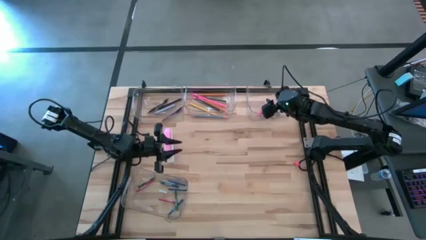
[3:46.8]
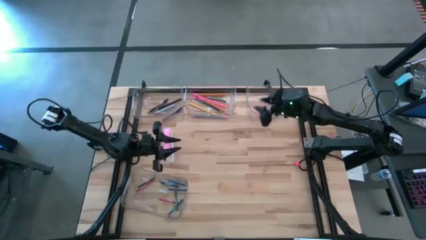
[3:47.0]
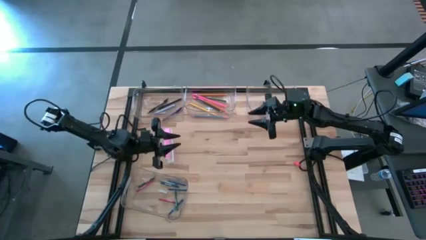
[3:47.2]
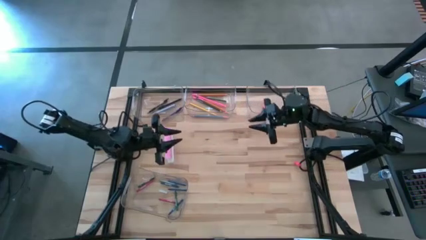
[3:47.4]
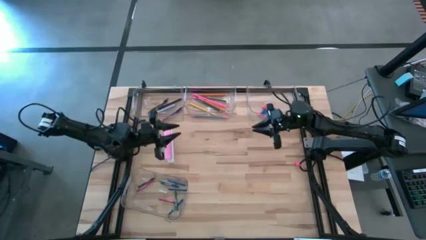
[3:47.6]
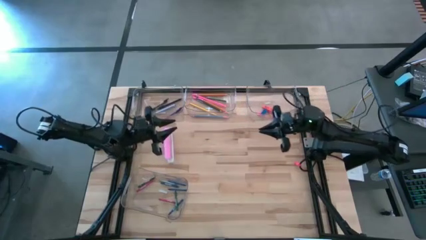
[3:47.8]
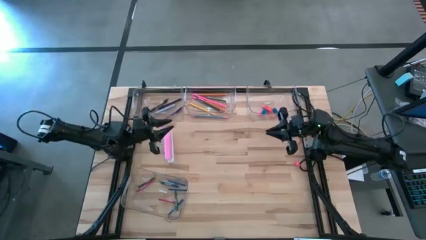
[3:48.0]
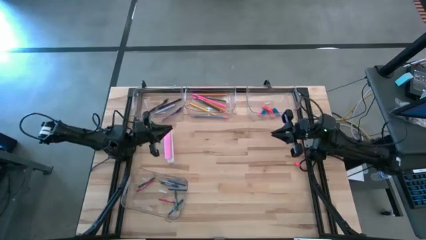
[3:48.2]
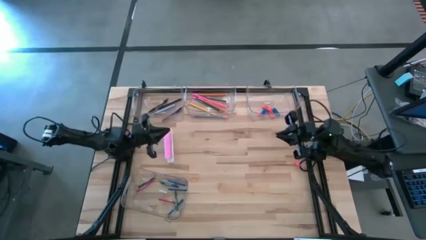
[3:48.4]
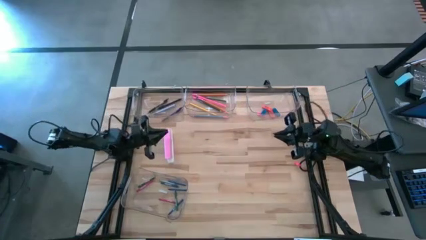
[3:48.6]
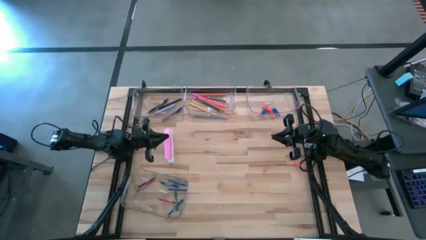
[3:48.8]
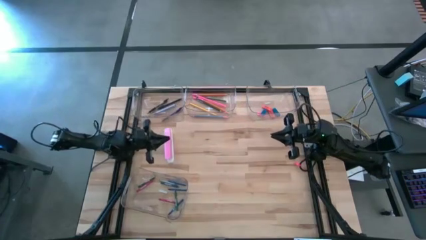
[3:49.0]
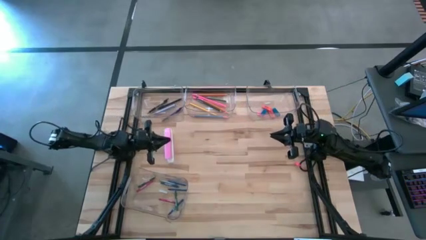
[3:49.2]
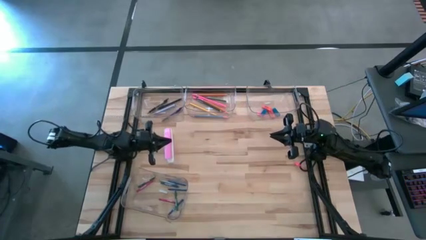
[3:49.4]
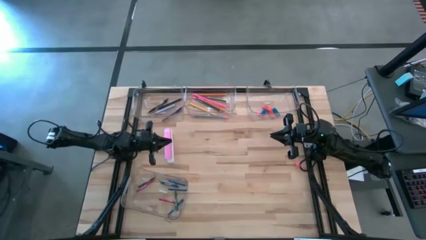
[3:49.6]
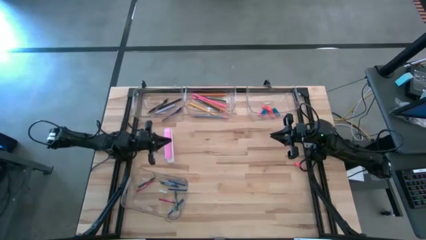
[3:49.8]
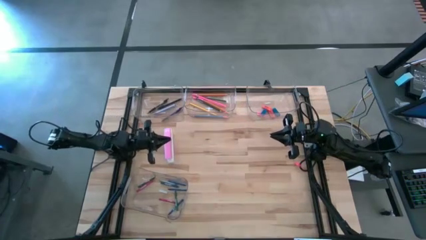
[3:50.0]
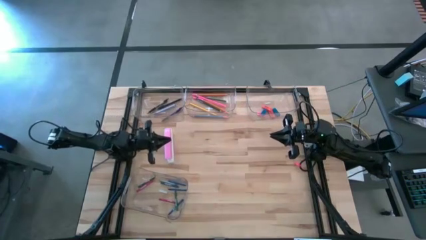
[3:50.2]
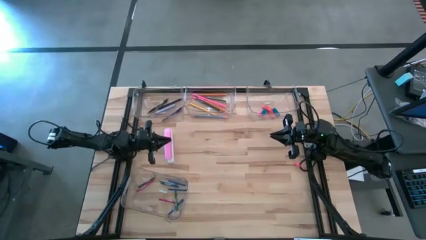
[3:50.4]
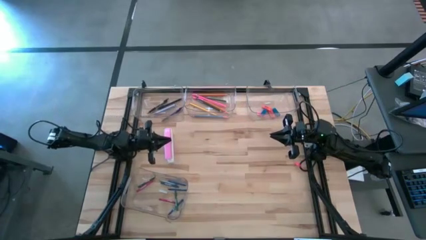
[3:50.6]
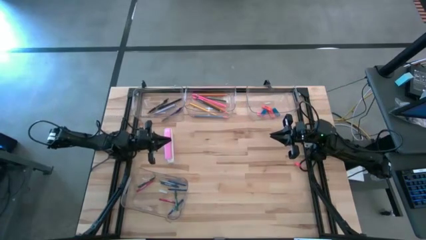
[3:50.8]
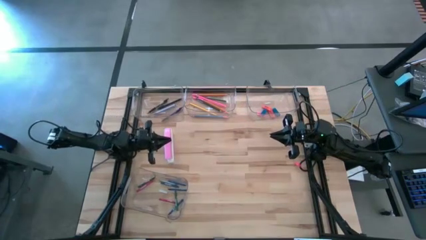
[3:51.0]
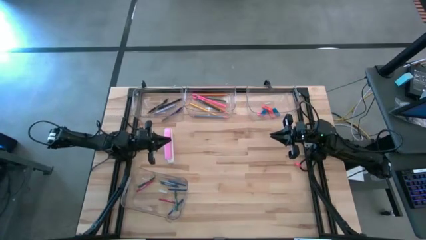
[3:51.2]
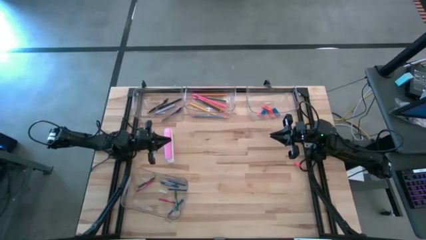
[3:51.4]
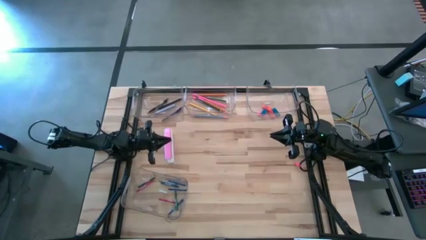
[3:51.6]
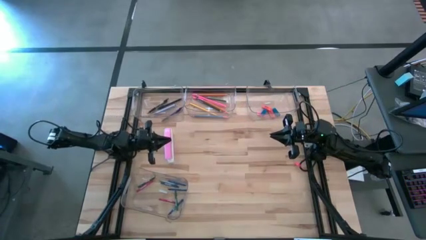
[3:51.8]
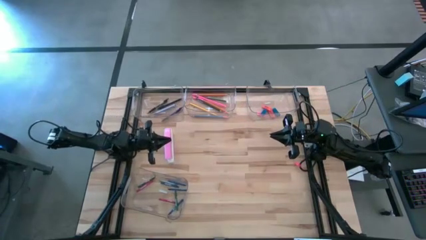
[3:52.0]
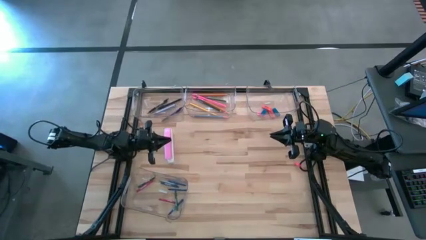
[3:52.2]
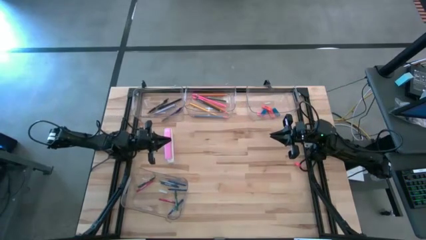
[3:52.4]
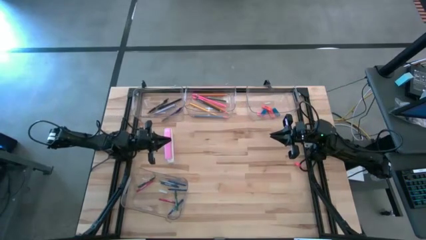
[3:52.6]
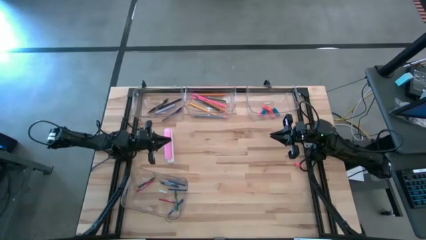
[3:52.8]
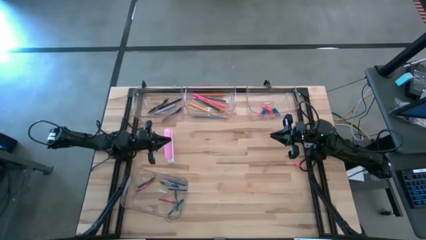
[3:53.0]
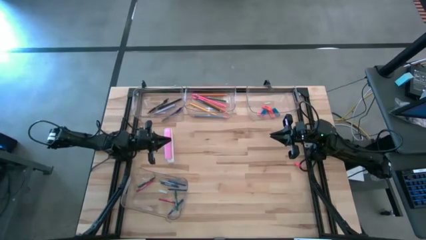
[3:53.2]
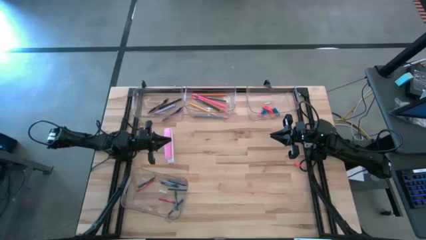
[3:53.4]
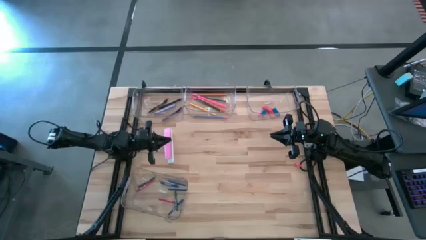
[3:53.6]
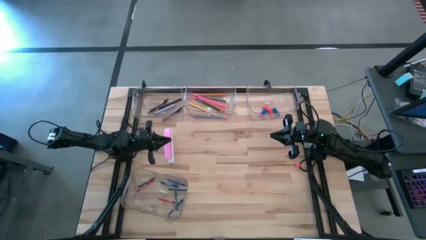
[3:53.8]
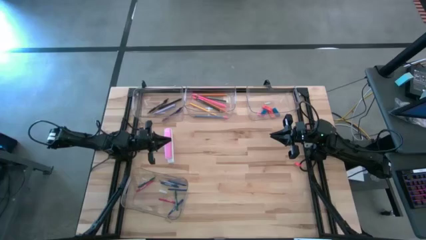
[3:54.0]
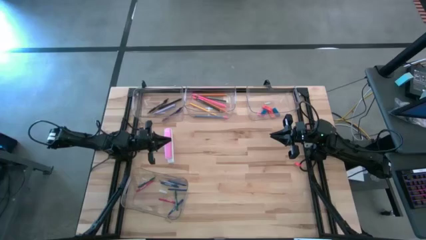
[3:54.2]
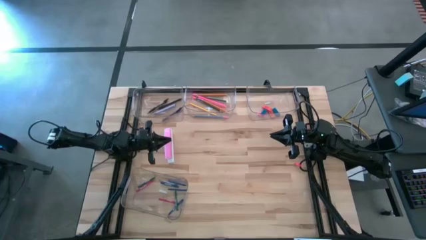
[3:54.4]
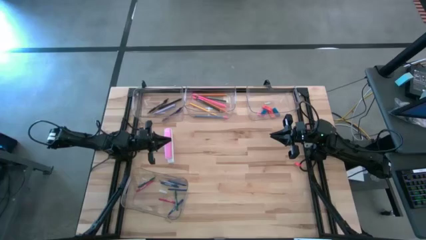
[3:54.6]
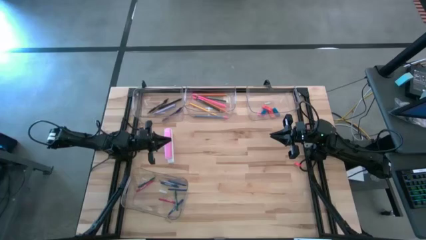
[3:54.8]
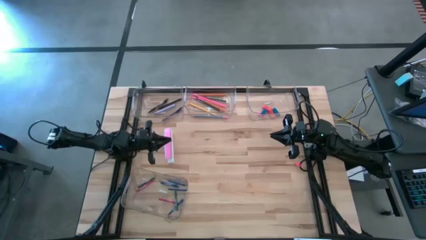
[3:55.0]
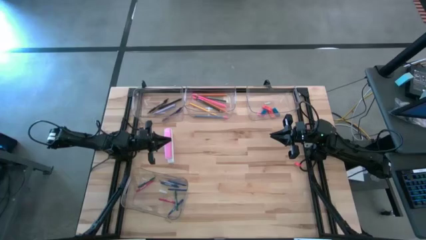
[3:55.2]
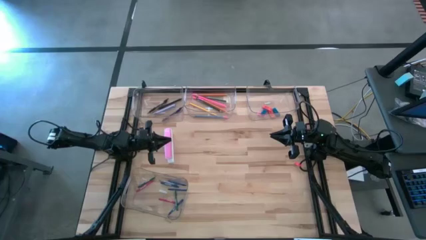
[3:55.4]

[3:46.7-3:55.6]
Task: Sort crayons/erasers/pens/pencils in bins
Return to Home Position
